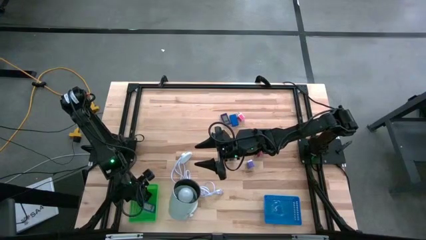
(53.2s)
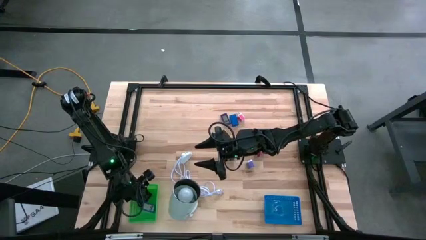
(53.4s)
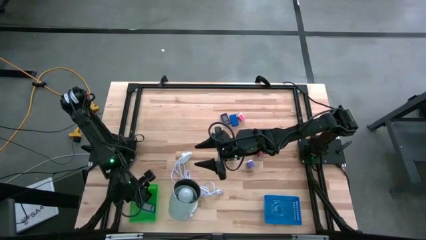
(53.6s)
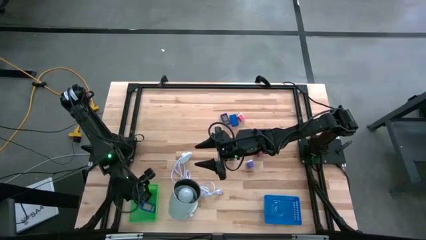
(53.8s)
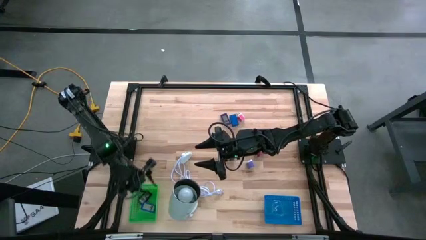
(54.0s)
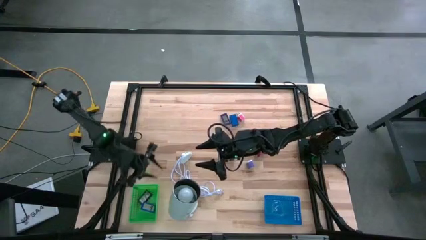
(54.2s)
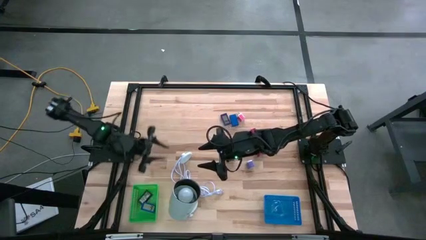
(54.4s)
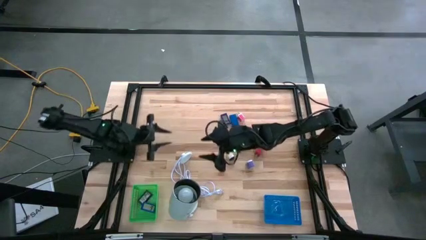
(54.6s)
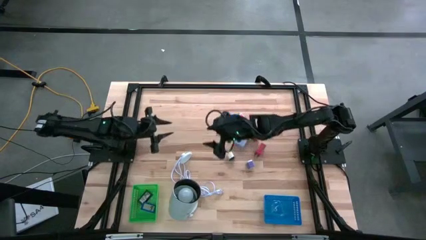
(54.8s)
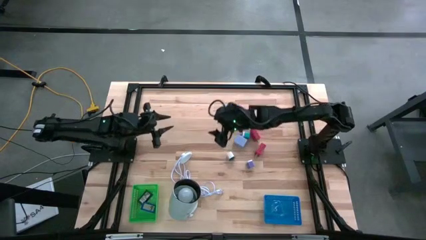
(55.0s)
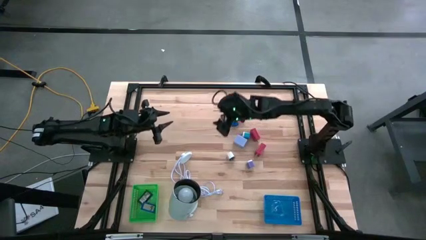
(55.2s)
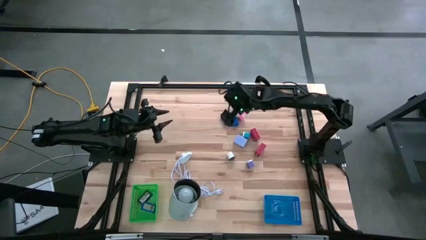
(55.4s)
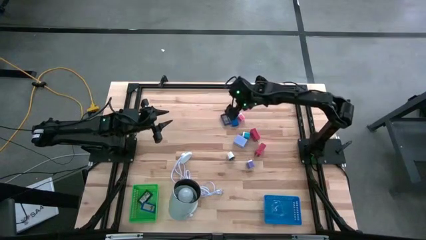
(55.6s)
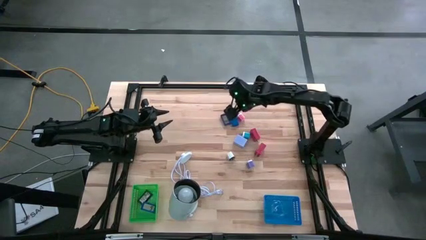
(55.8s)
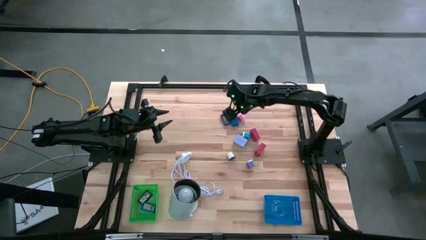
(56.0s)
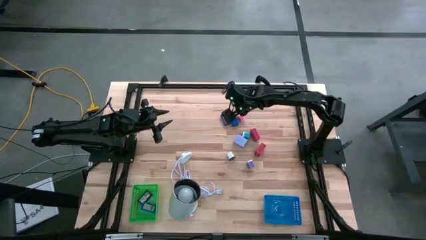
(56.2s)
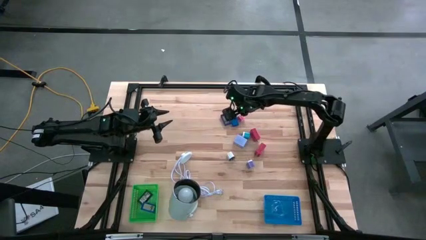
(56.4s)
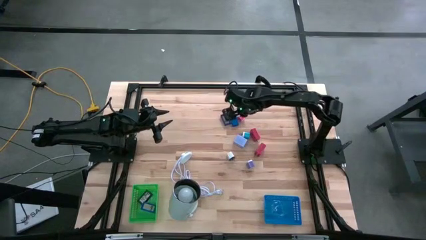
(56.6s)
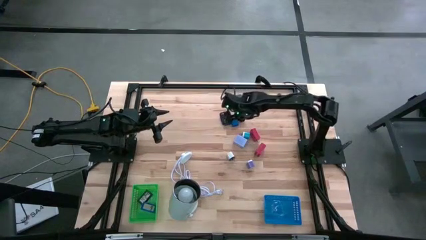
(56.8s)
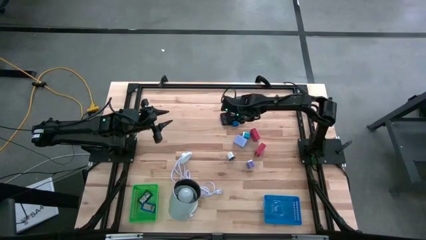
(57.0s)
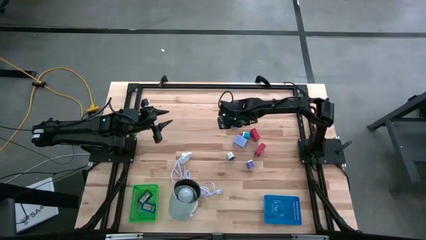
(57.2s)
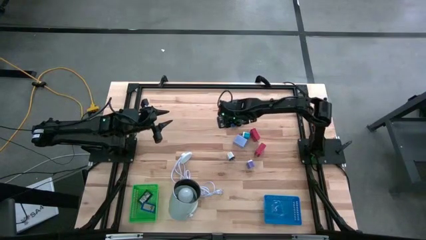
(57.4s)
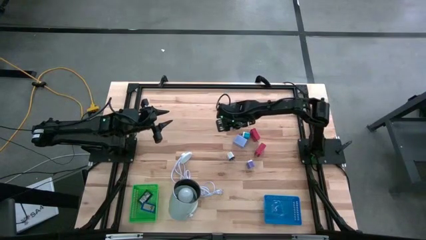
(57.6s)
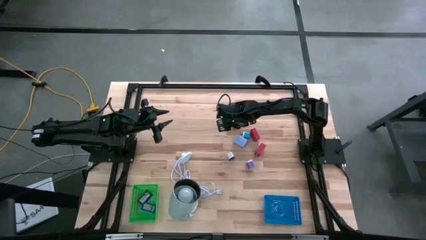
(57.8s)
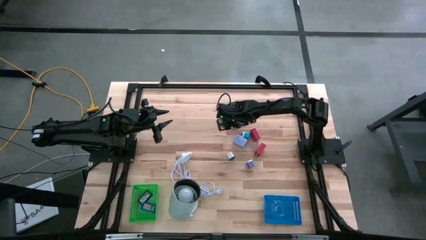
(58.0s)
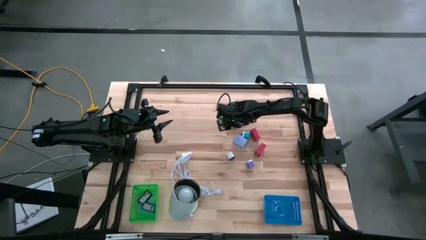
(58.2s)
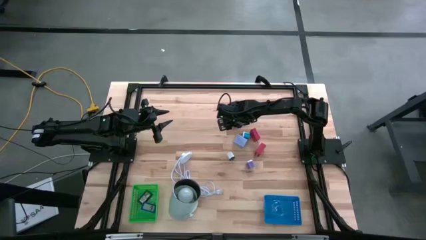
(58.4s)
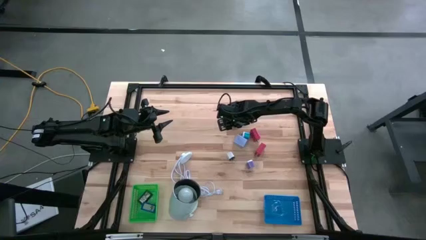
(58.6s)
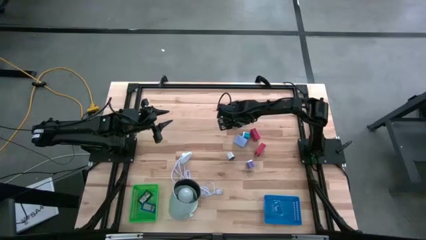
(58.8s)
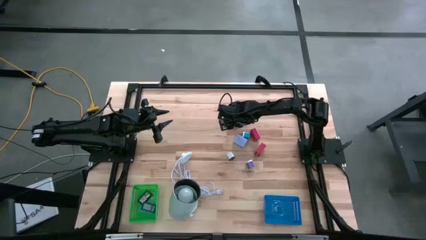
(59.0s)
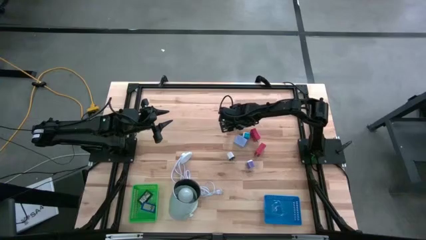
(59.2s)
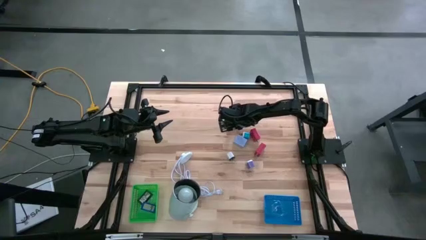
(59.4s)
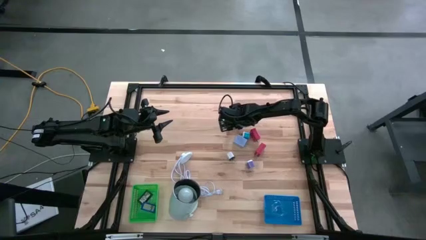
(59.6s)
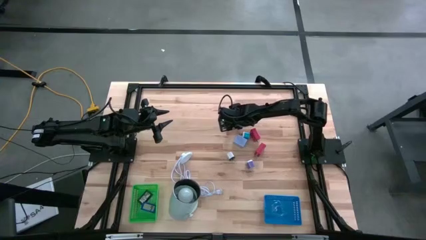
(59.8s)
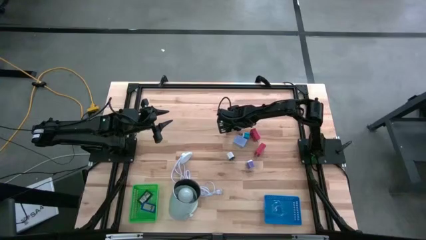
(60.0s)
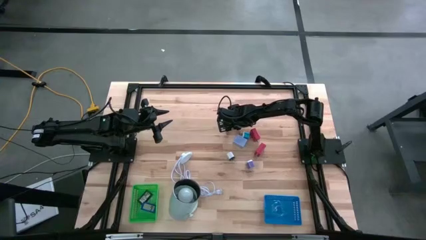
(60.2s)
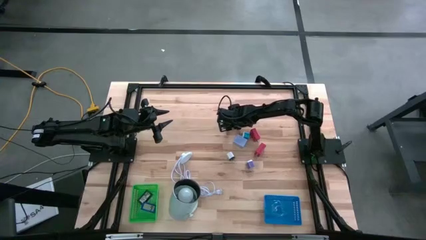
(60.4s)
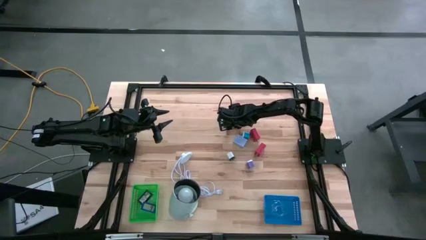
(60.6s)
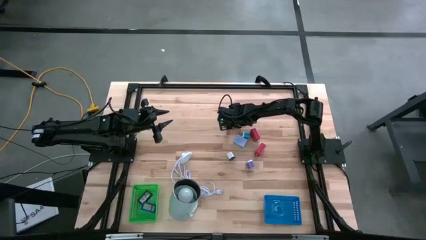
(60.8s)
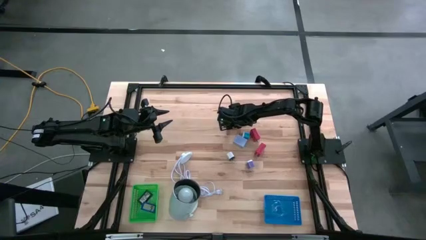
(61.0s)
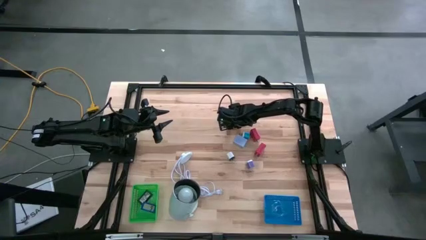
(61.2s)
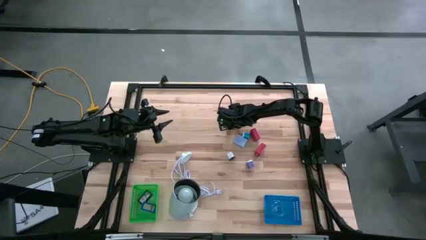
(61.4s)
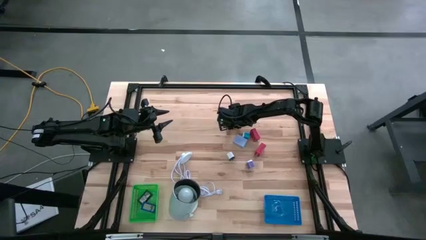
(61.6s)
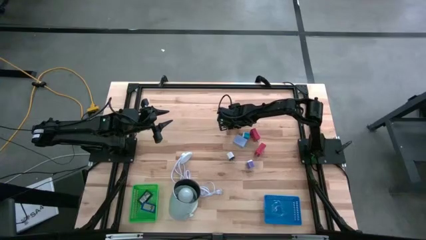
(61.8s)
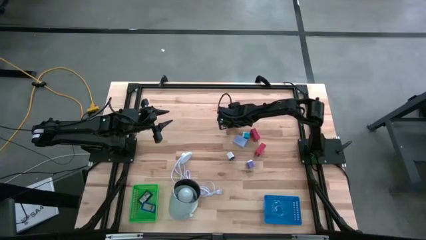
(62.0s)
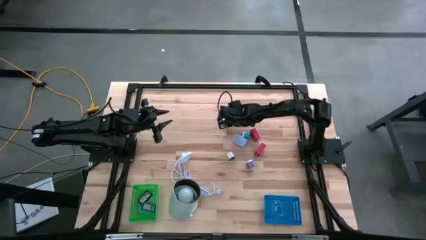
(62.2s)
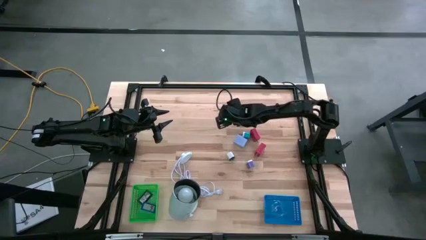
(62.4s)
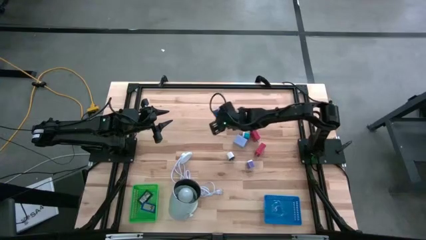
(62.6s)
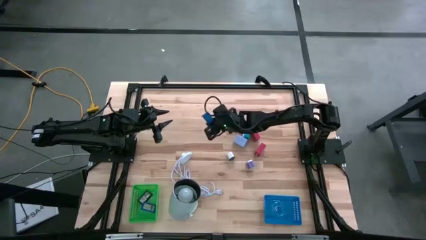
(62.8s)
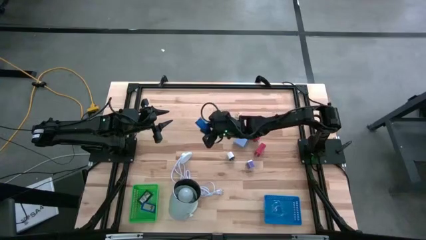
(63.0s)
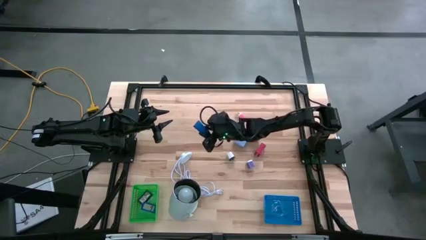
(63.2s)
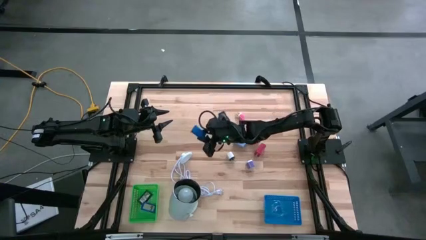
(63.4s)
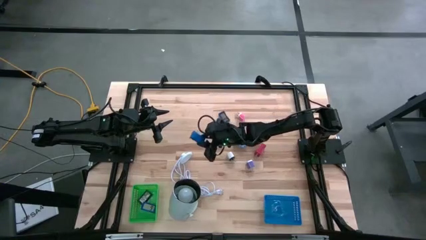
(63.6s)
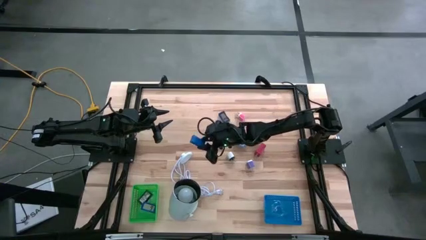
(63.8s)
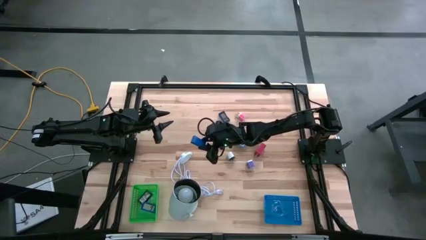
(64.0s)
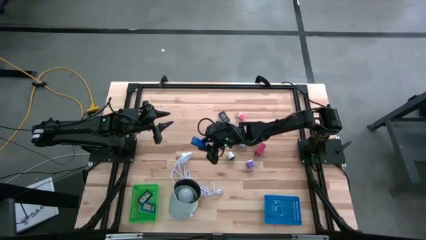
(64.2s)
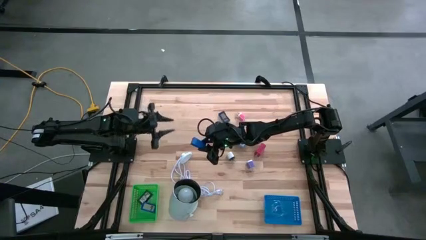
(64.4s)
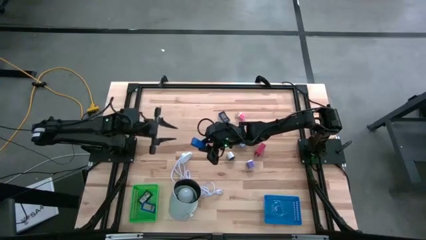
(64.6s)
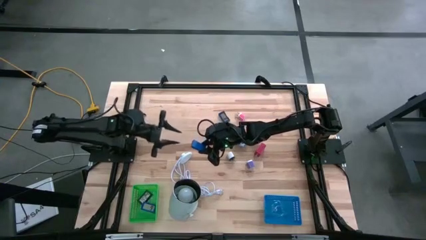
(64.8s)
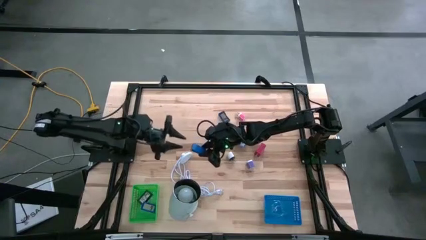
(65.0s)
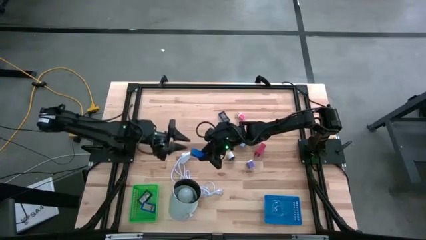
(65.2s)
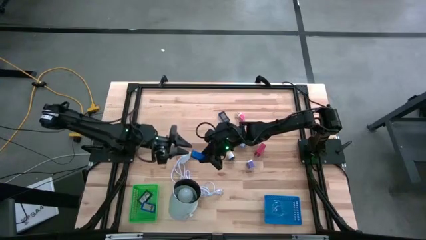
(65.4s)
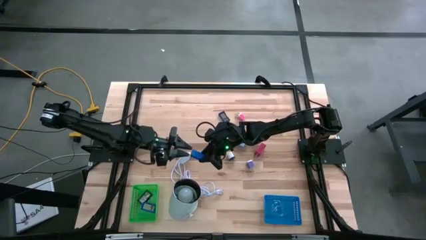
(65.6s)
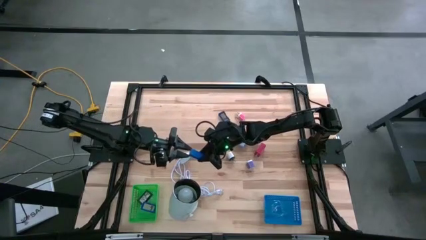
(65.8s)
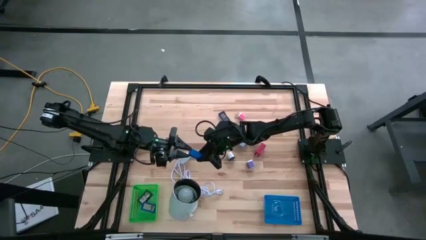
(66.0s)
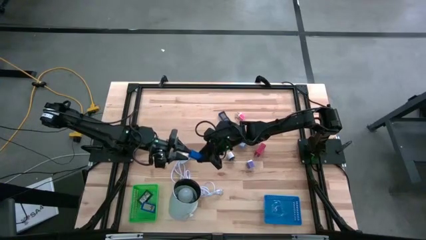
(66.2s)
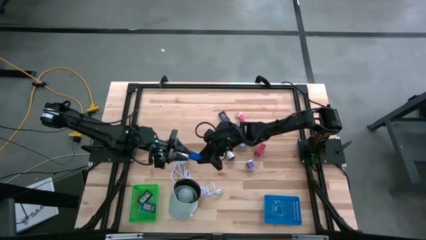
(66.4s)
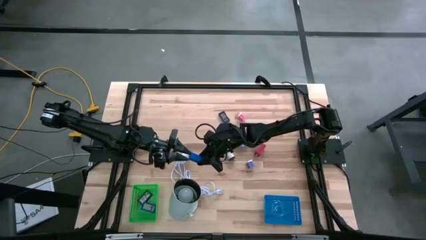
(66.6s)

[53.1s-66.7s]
Task: Pick & Place Office items
Put the blue digital timer into the green basket

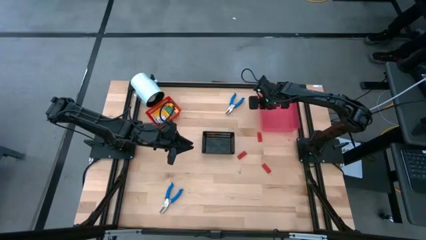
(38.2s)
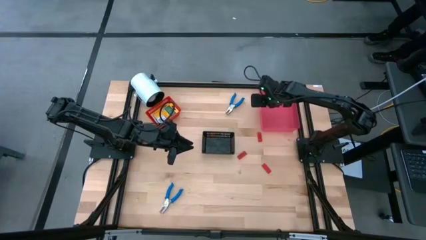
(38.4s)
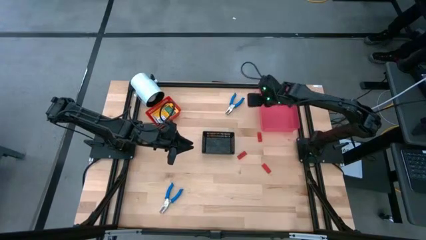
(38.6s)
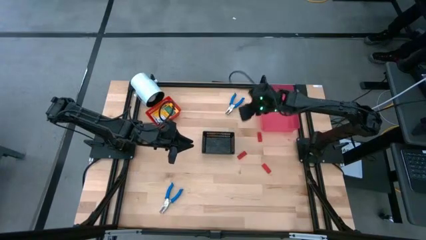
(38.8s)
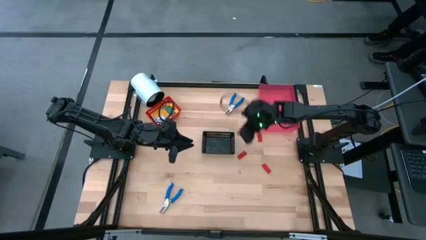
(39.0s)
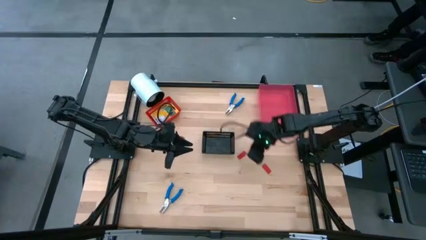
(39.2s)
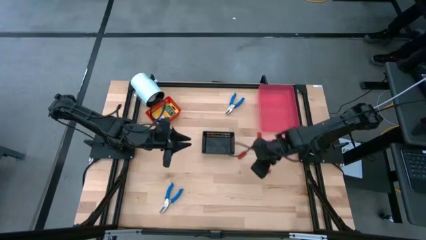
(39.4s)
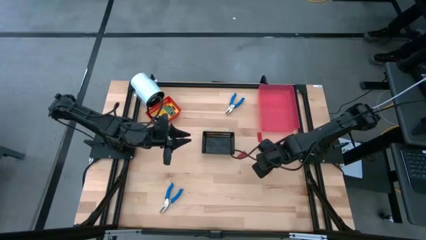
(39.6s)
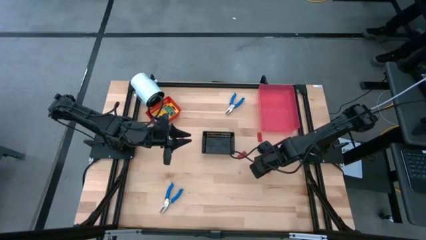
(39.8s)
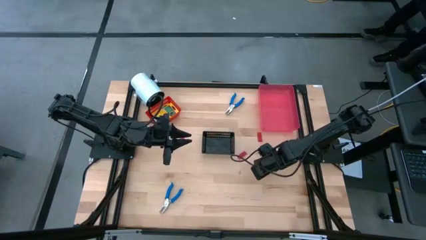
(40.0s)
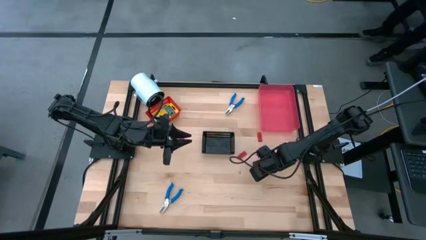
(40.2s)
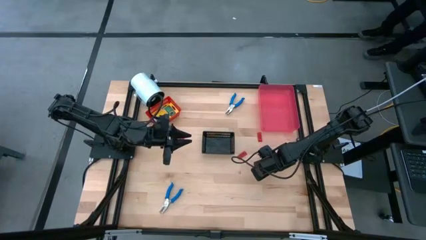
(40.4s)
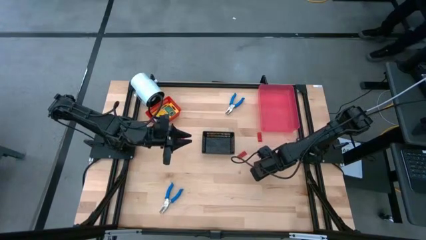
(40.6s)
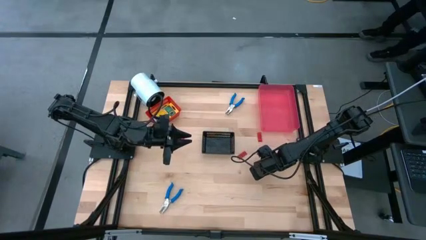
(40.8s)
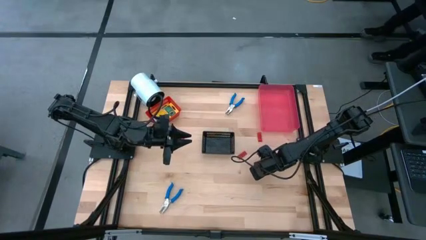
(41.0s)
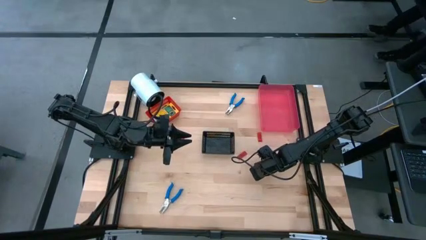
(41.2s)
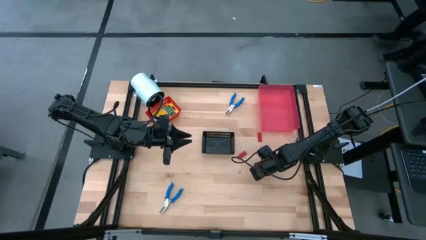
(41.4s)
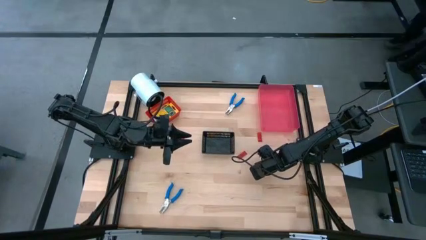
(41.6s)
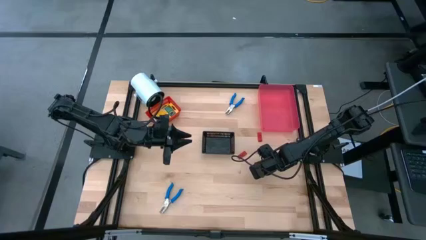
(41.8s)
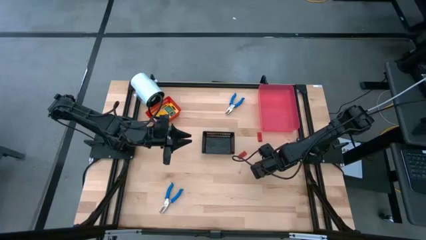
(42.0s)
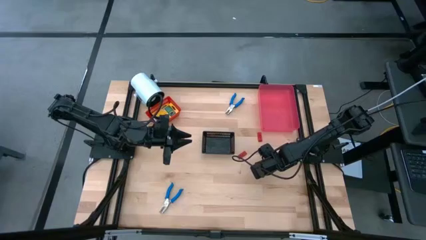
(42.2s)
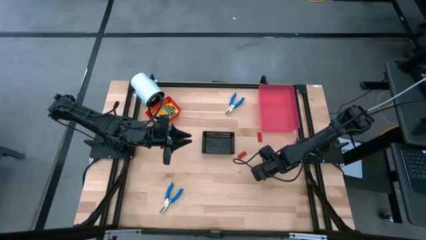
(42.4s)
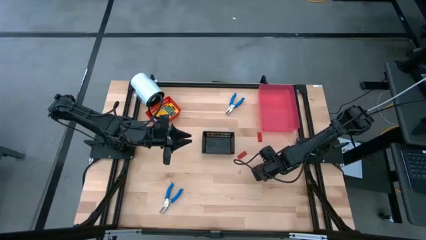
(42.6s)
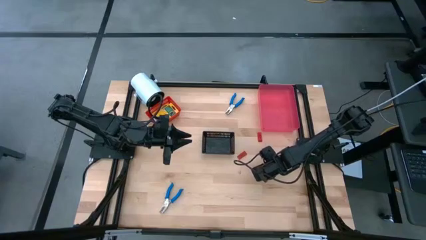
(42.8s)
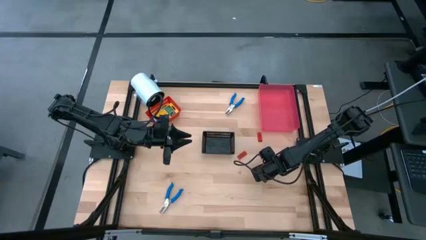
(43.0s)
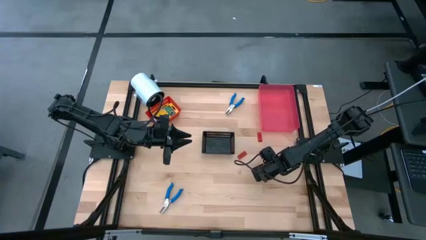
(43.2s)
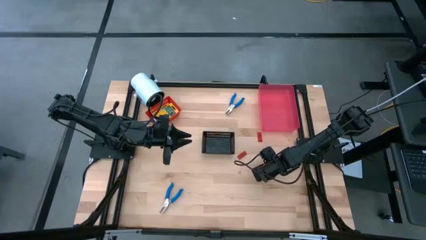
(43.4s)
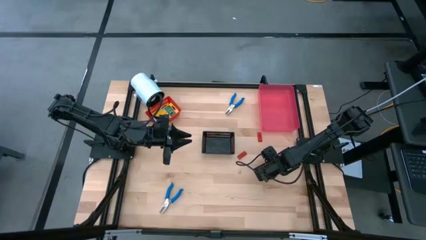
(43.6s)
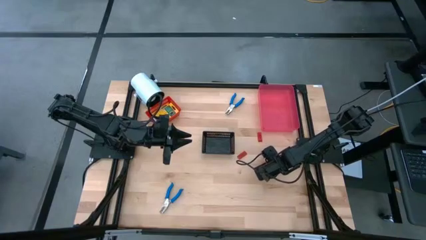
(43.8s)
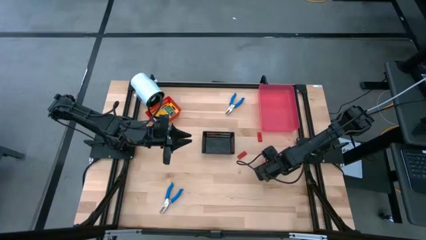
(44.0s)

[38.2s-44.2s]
Task: Pick & Place School Supplies
Put the red eraser into the black bin
